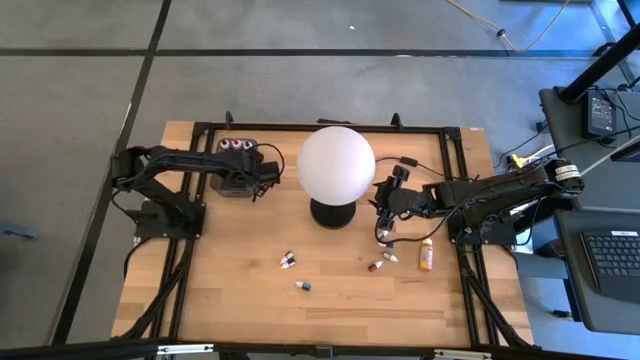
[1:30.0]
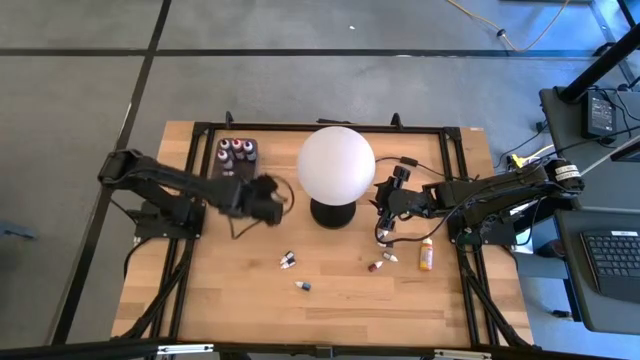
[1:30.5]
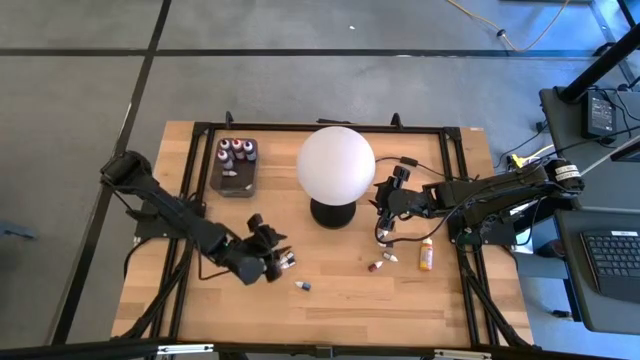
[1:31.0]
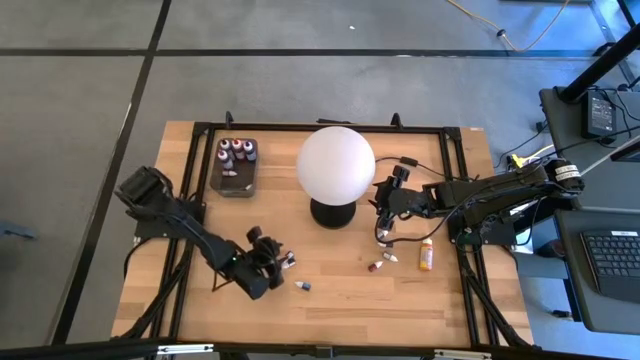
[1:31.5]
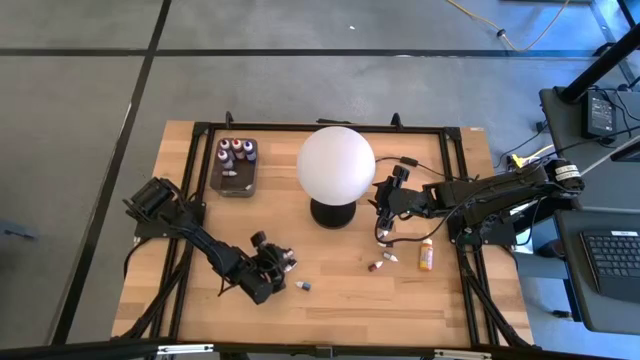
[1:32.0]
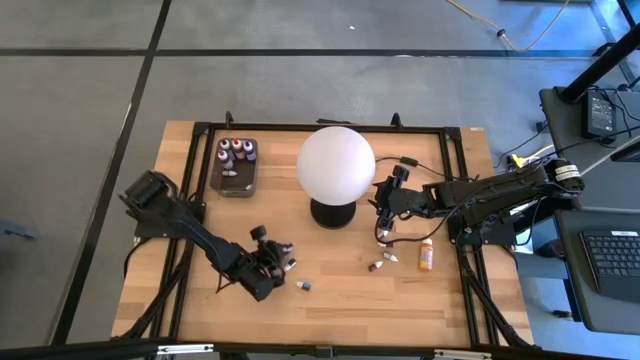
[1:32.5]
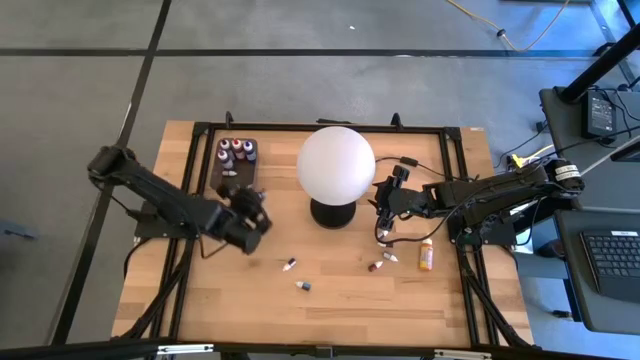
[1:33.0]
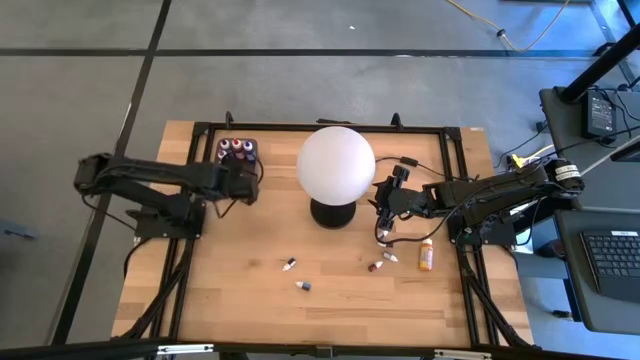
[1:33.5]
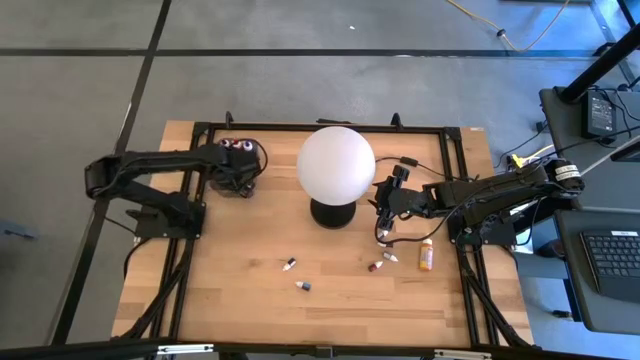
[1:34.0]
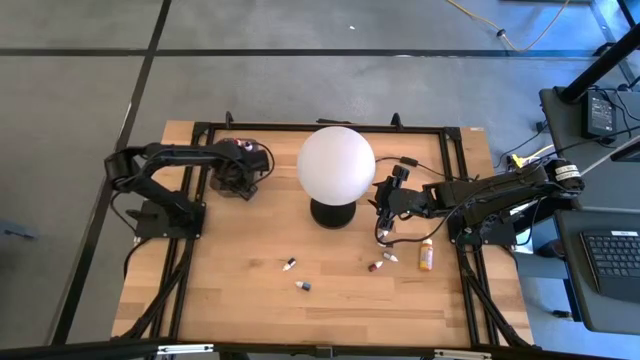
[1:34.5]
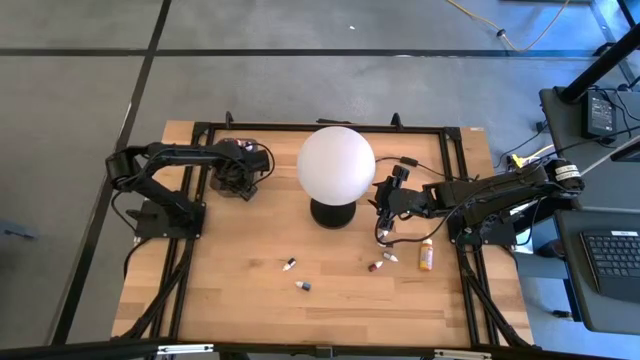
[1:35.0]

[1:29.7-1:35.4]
Task: Pick & Place food coloring
Put the small brown food coloring bottle into the black container

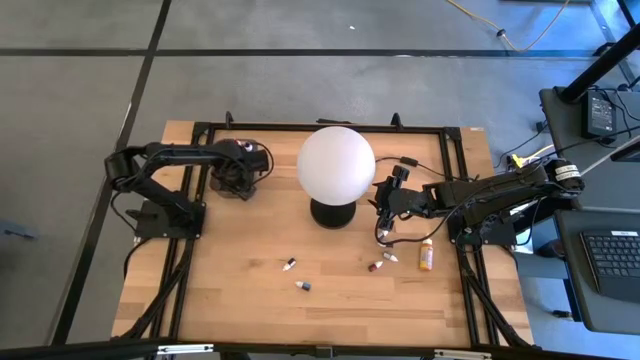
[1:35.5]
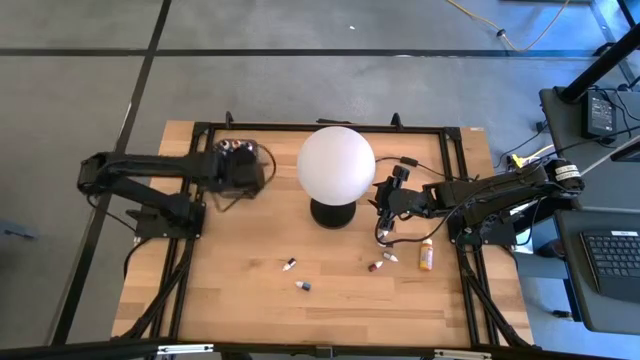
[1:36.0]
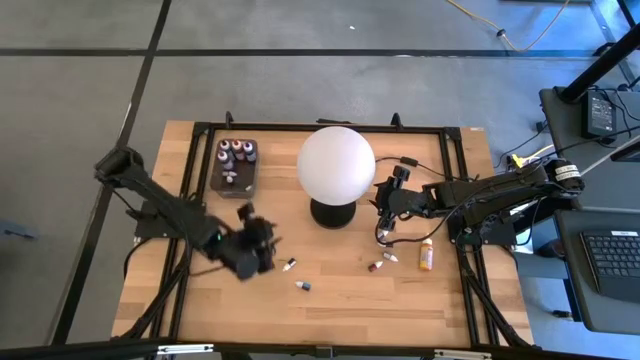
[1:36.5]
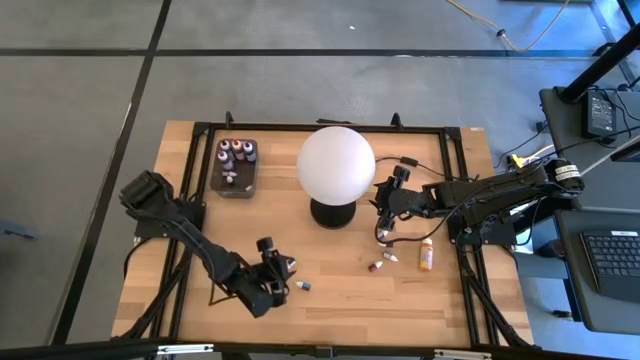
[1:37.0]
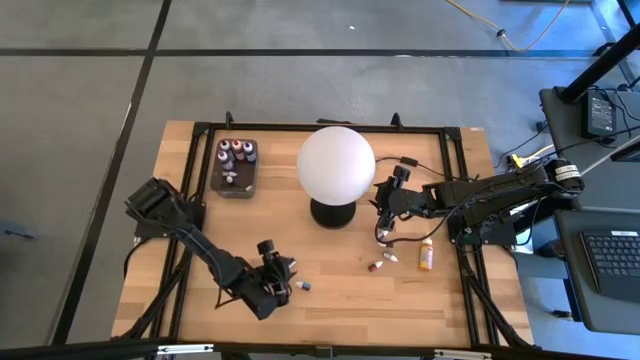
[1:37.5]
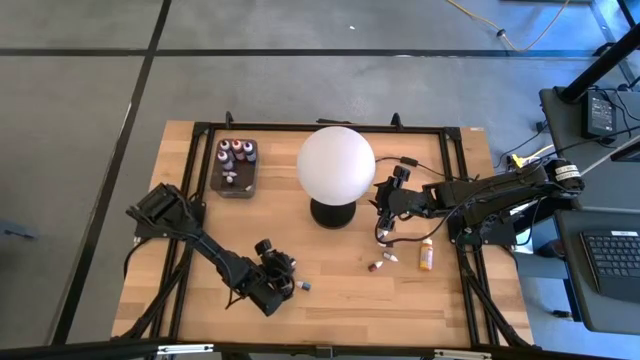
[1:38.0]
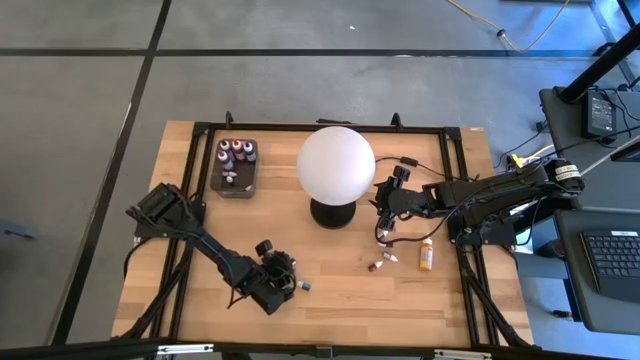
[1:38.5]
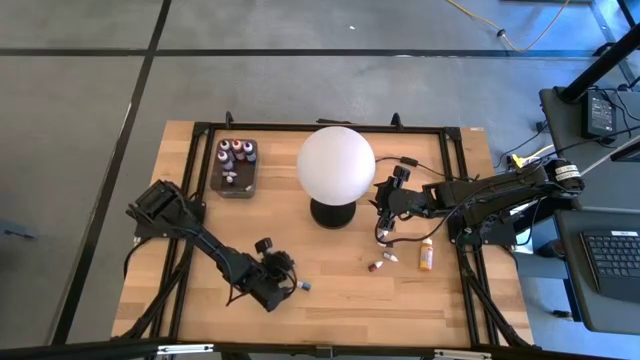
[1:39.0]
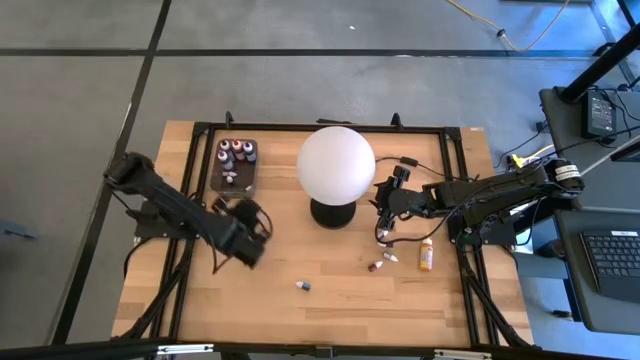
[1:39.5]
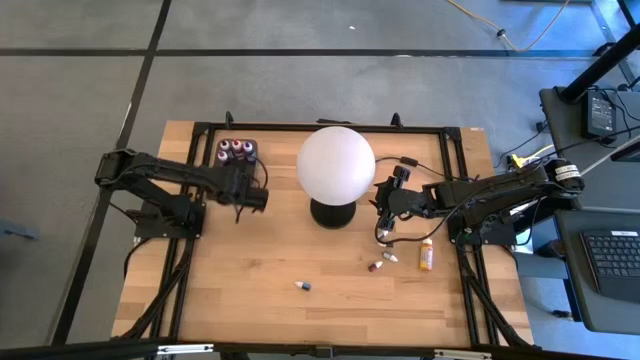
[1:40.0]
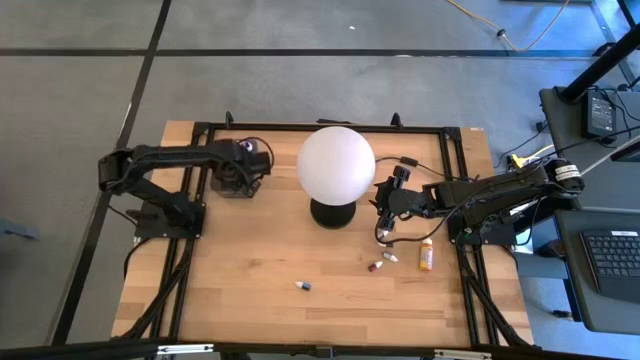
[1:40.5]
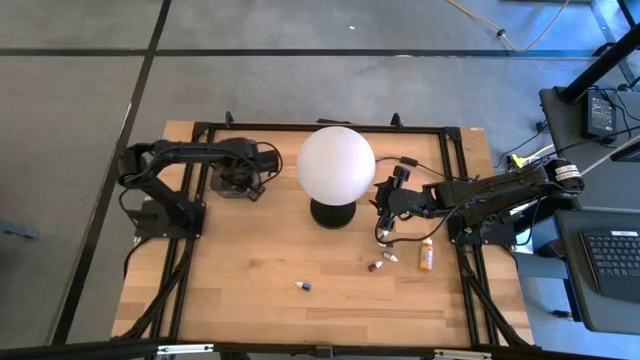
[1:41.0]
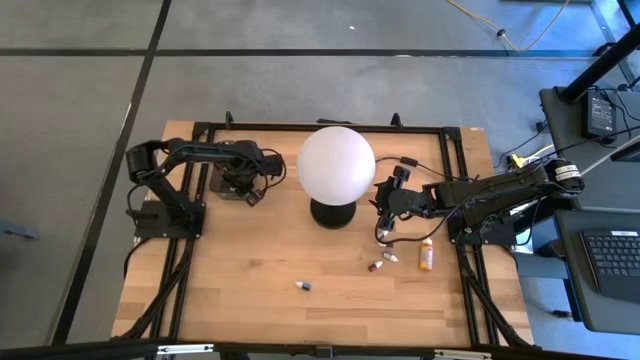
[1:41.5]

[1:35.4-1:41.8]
Put the left small green food coloring bottle into the black container

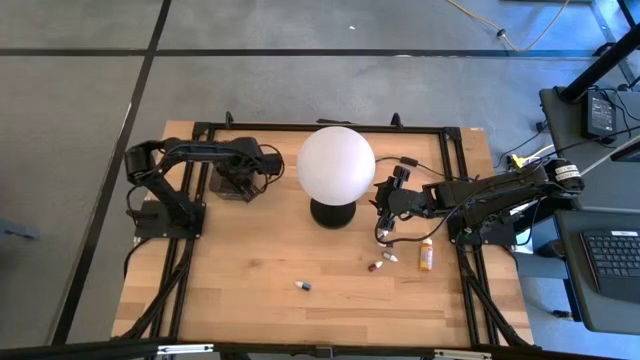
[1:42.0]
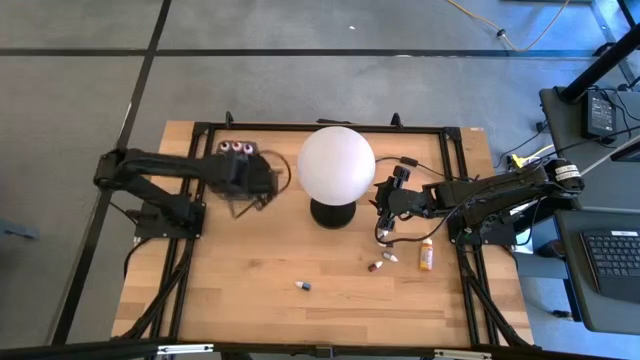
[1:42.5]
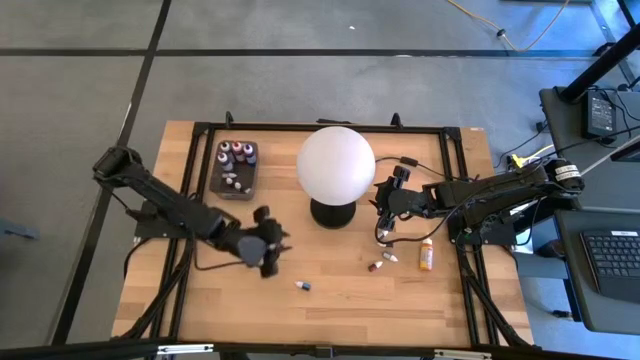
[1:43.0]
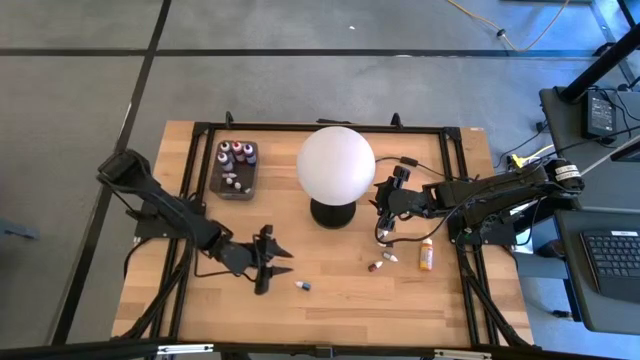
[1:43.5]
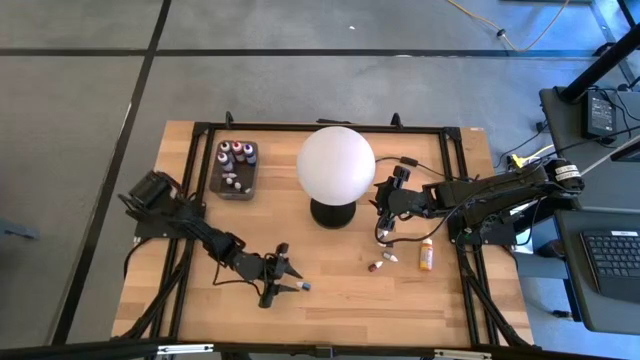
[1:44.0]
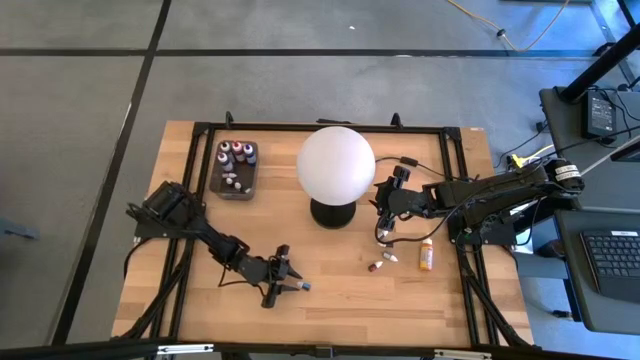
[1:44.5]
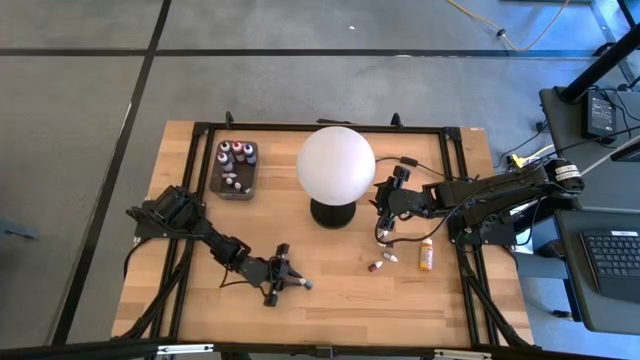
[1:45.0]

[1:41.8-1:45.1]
Put the small blue food coloring bottle into the black container

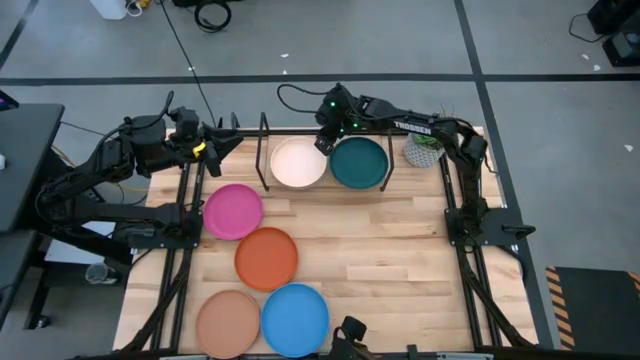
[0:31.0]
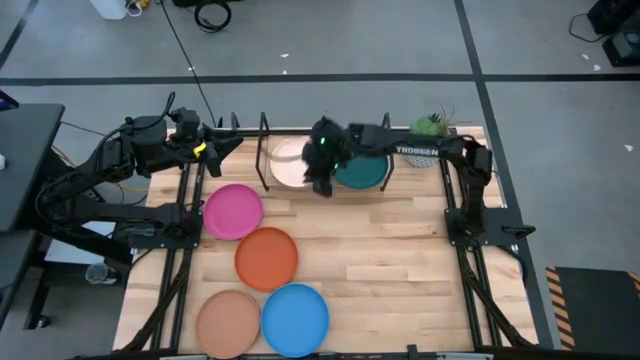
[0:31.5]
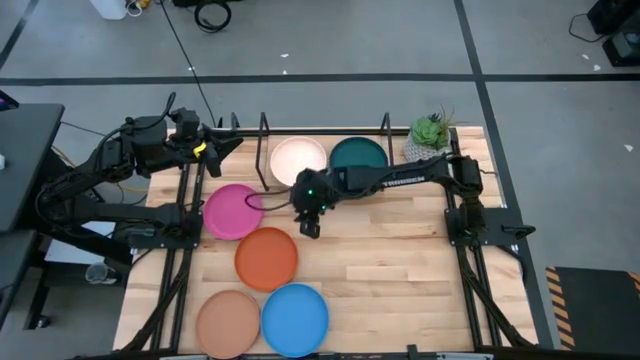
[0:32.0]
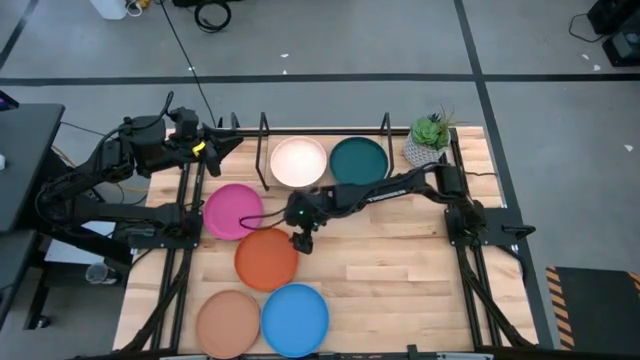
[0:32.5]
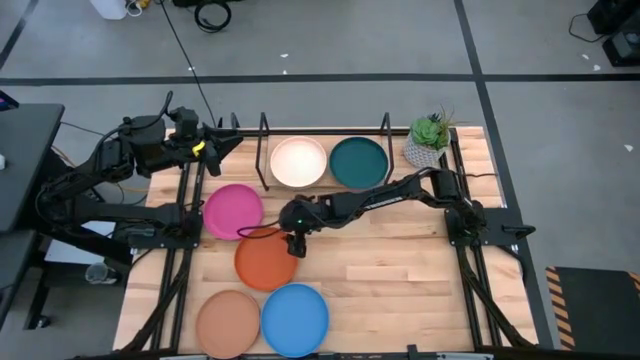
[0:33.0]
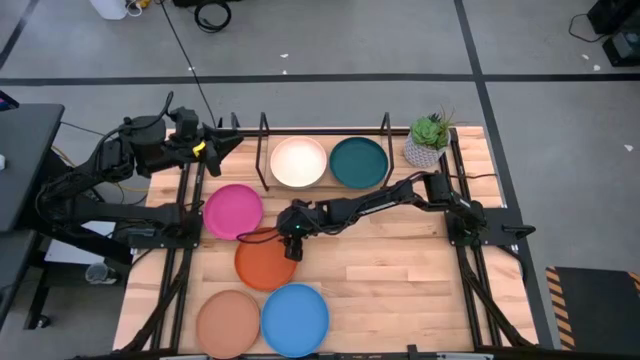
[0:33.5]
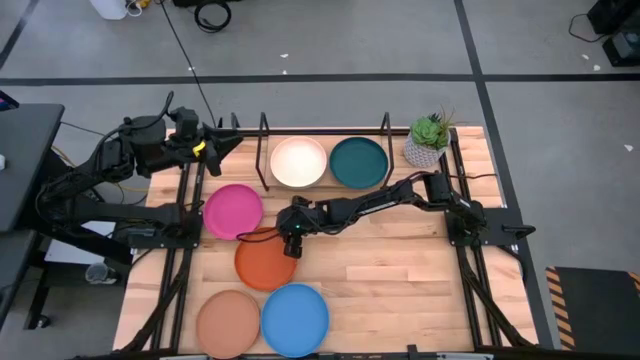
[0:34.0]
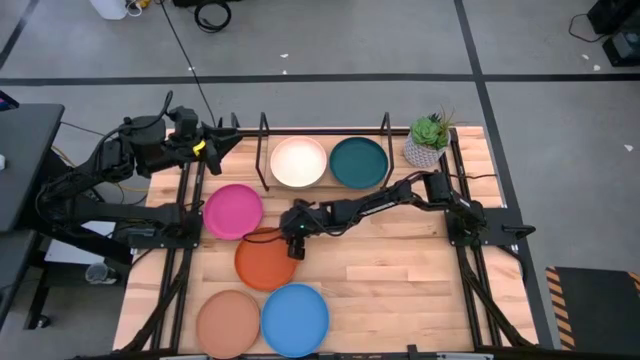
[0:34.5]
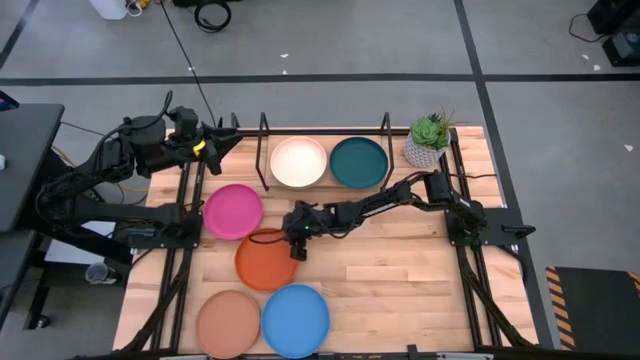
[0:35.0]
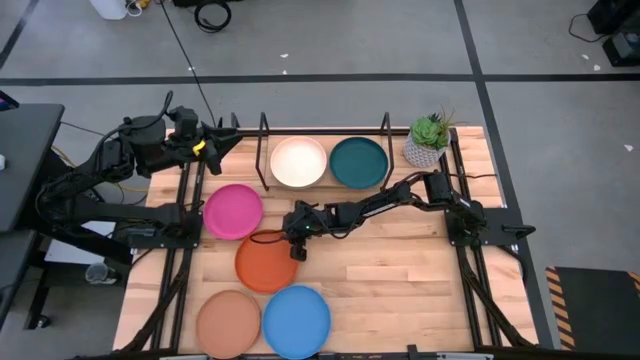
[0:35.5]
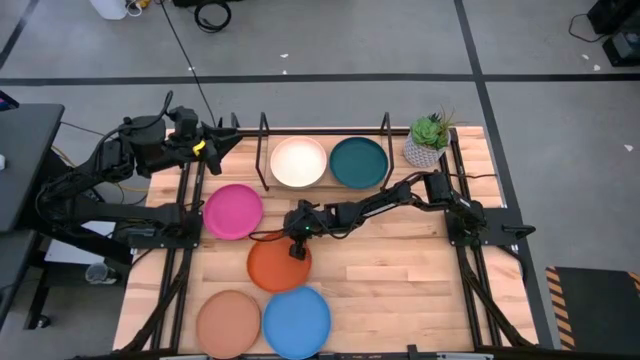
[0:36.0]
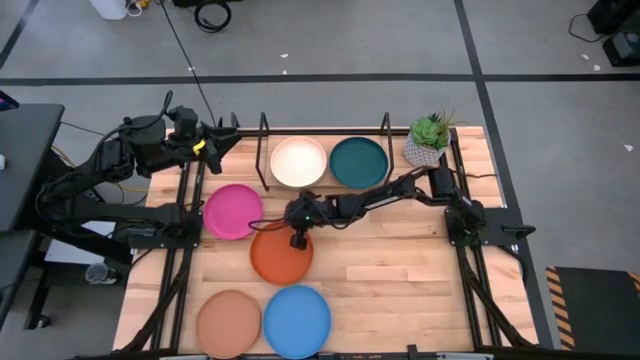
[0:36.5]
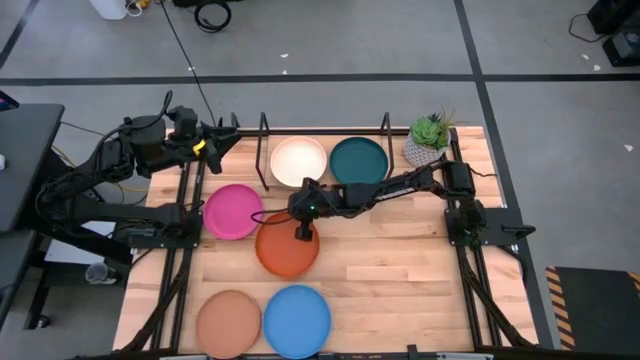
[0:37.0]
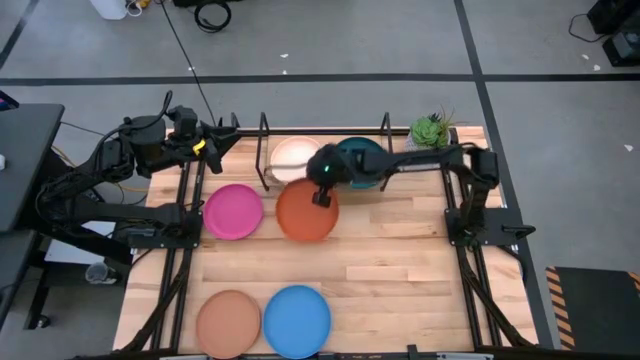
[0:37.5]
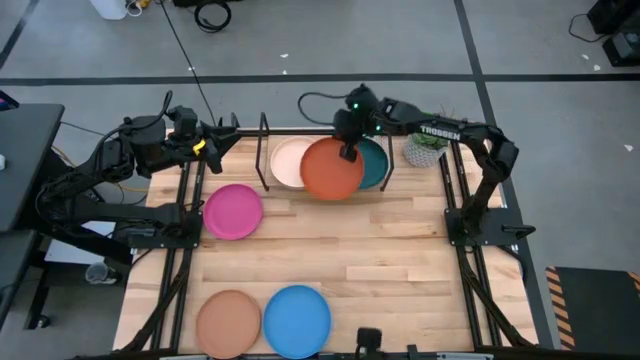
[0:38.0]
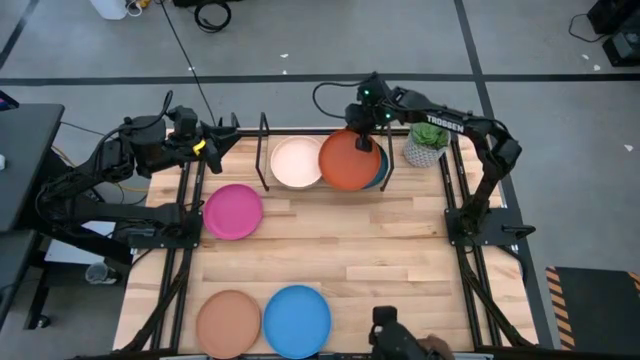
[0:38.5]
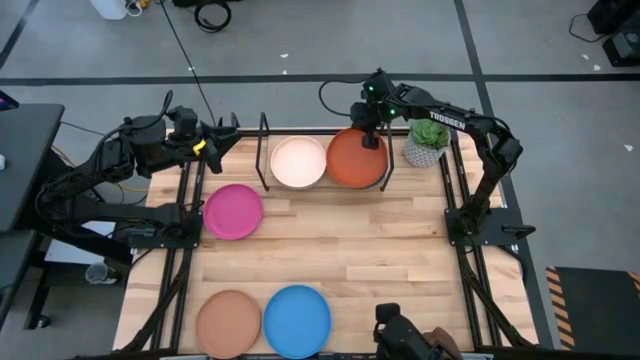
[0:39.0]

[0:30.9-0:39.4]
Task: Place and stack plates onto a shelf
Stack the orange plate on top of the dark blue plate on the shelf
